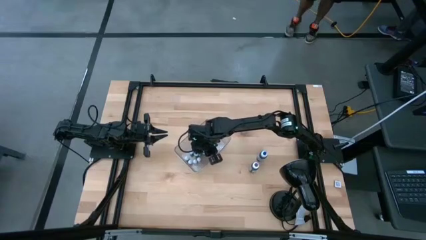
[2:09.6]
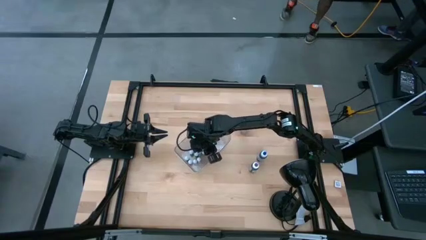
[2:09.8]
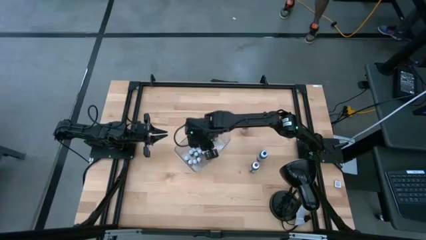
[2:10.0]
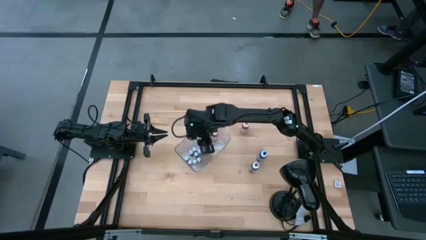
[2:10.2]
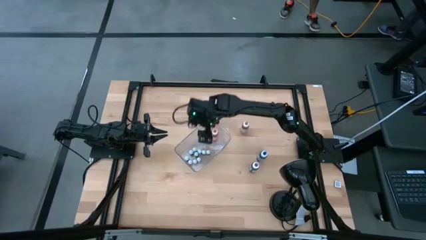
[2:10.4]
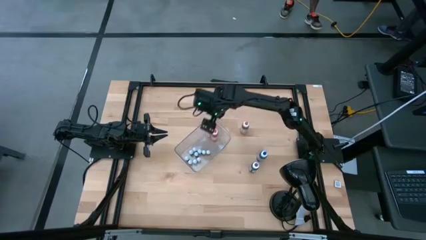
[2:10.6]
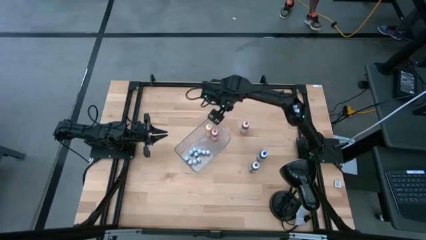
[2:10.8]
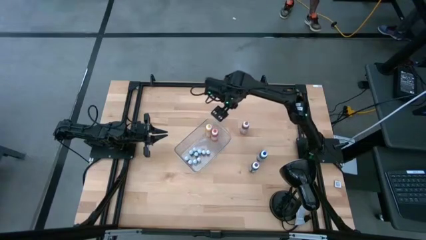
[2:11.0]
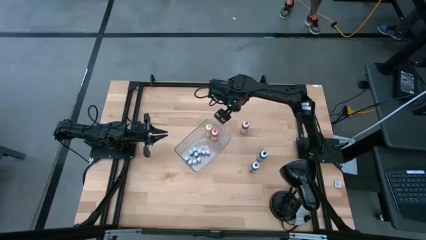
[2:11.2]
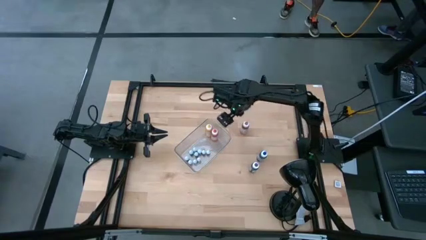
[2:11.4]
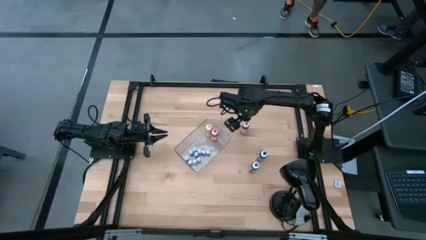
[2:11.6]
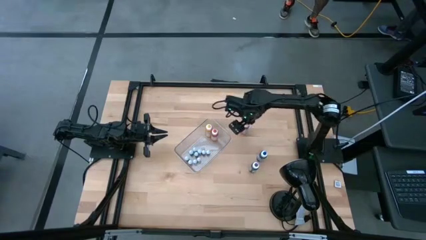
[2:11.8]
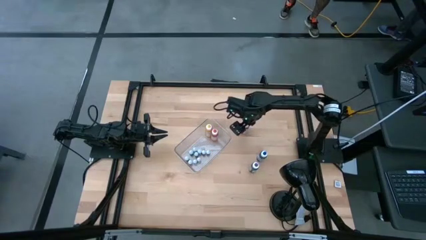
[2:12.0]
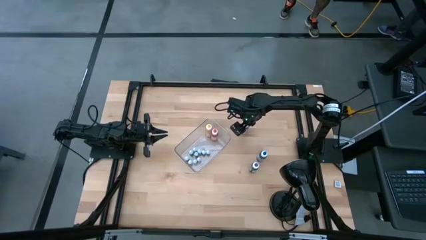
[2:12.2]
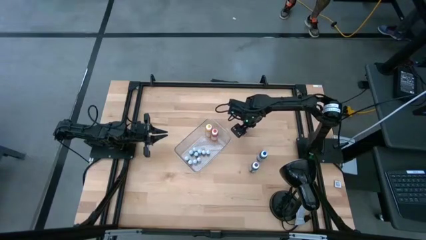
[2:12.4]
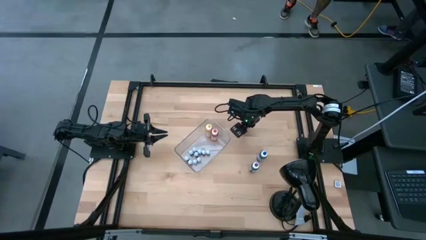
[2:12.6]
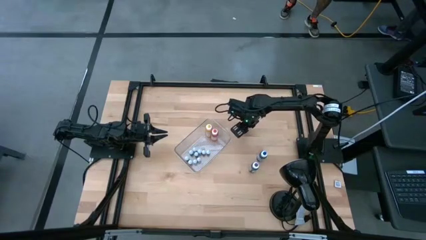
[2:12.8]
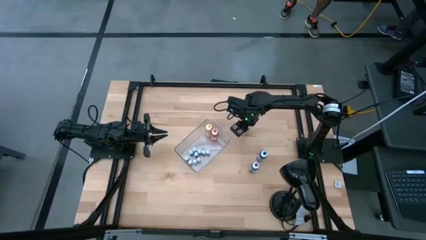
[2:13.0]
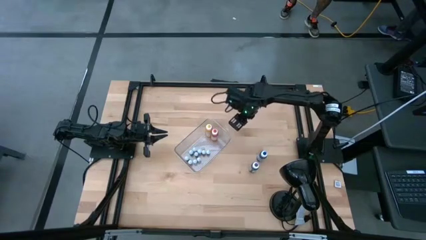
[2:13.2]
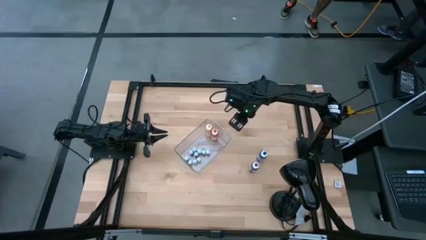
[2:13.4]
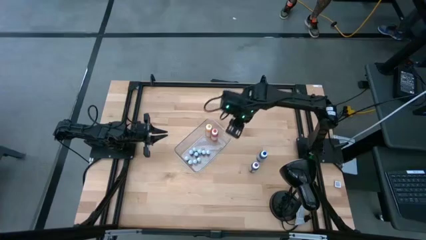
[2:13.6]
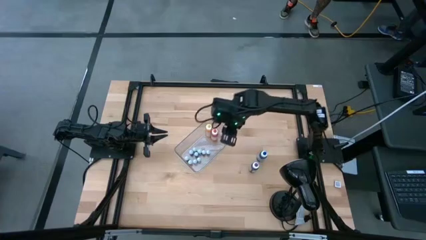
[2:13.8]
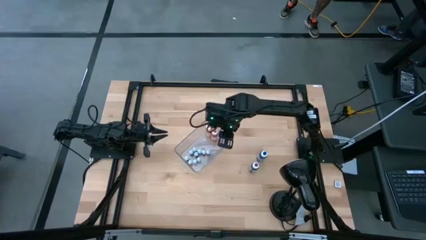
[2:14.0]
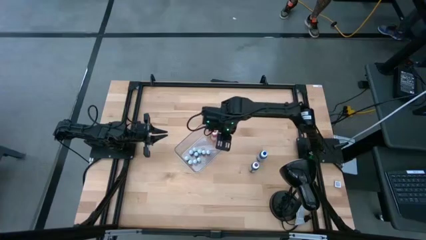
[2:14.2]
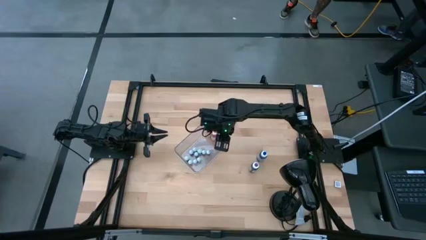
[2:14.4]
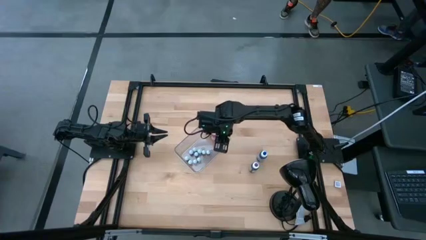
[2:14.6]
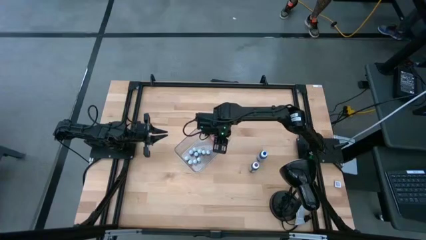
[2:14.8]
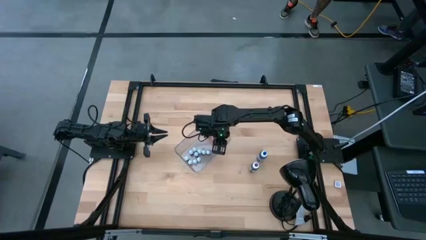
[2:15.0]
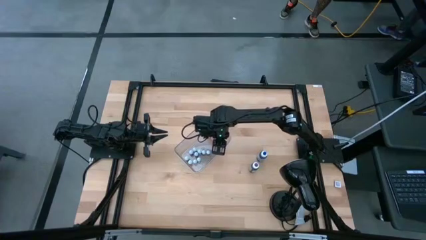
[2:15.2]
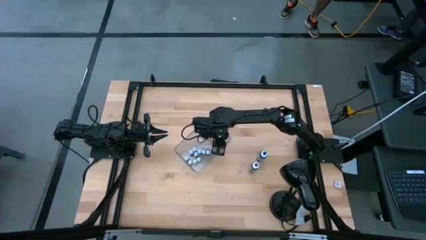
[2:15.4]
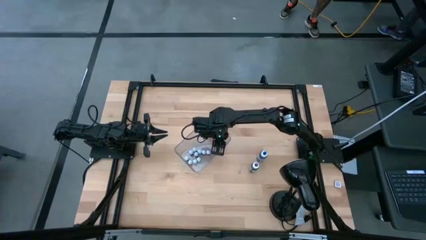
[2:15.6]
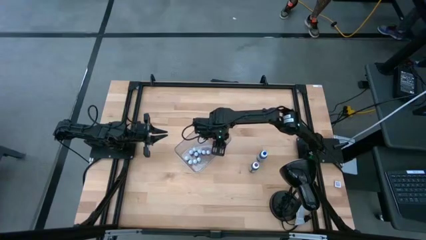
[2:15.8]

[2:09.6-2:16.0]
Task: Pick & Place food coloring
Put the large pink food coloring bottle into the transparent bin

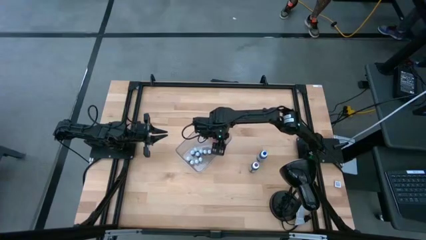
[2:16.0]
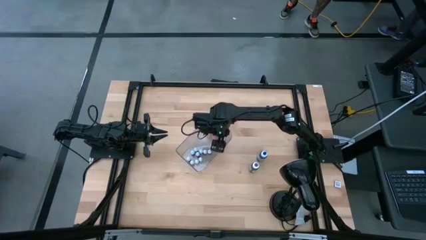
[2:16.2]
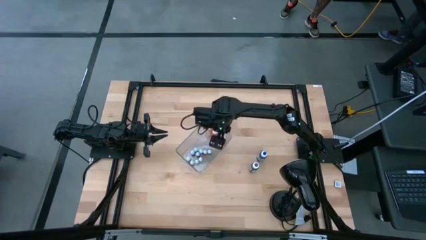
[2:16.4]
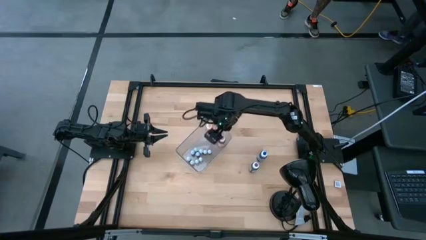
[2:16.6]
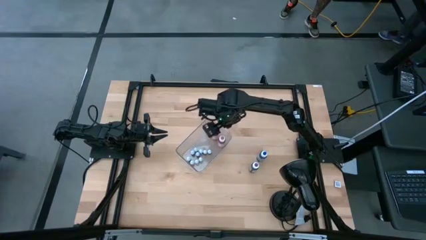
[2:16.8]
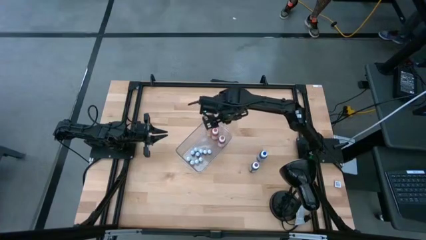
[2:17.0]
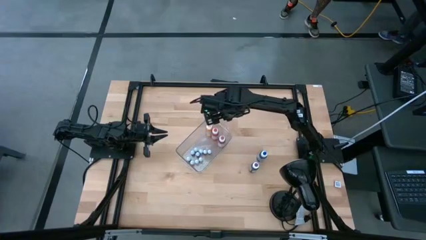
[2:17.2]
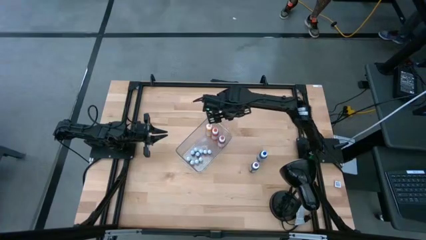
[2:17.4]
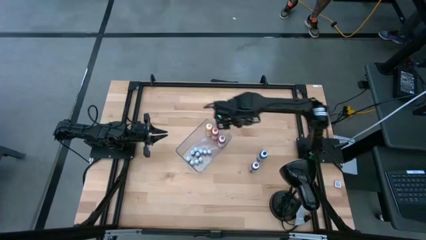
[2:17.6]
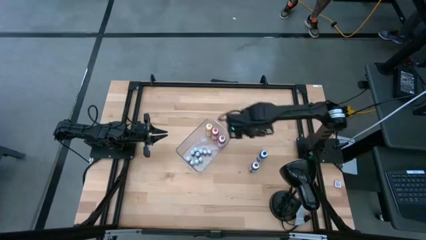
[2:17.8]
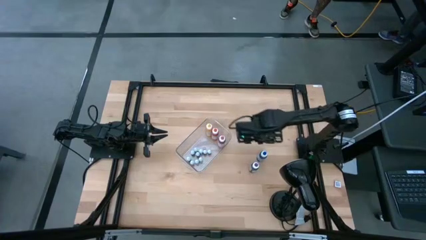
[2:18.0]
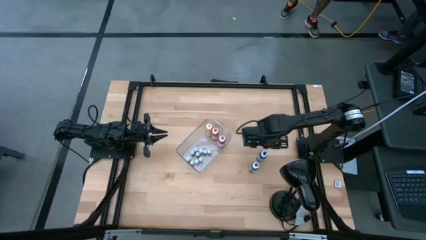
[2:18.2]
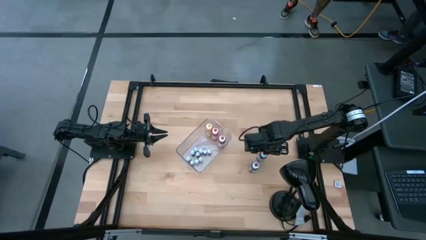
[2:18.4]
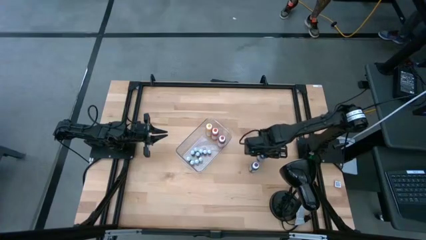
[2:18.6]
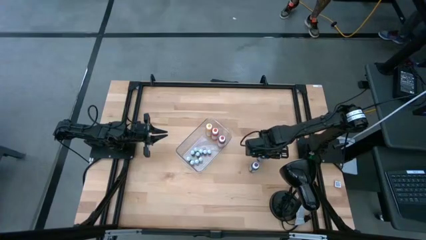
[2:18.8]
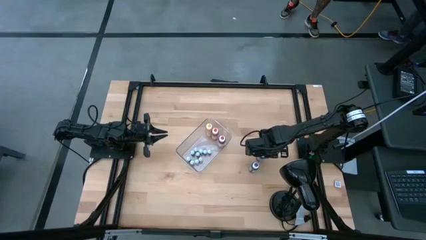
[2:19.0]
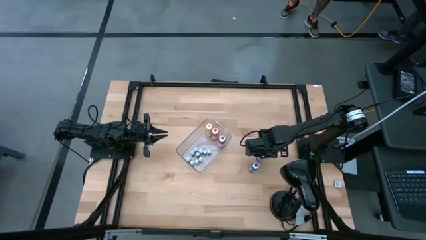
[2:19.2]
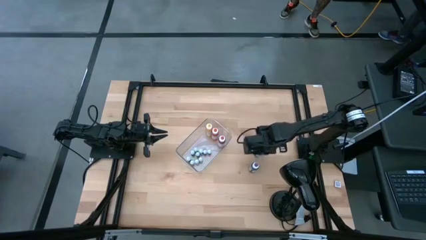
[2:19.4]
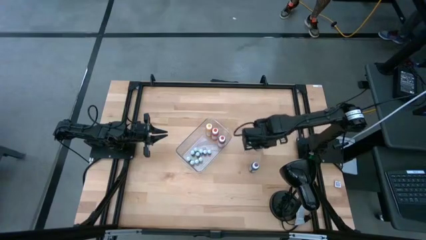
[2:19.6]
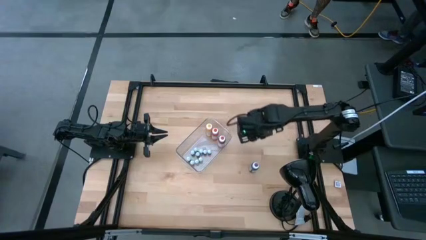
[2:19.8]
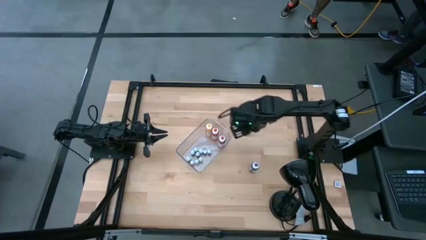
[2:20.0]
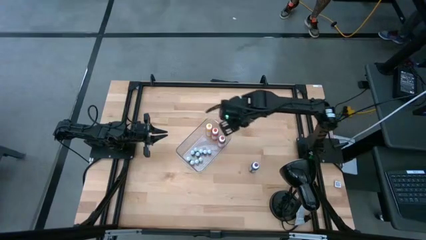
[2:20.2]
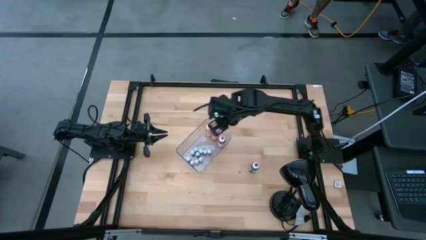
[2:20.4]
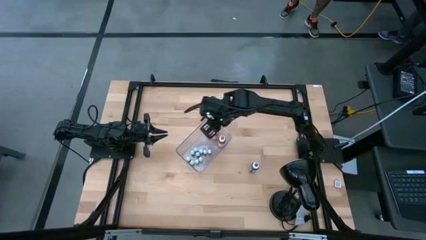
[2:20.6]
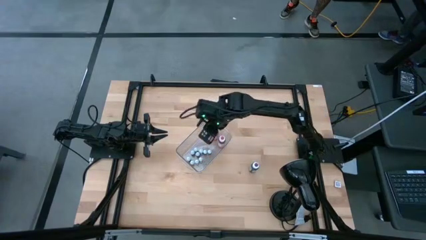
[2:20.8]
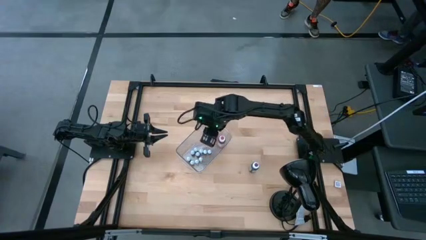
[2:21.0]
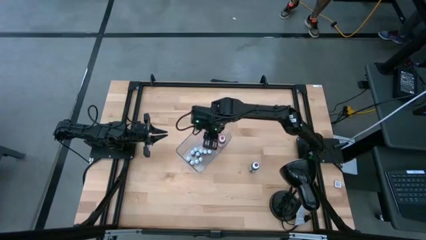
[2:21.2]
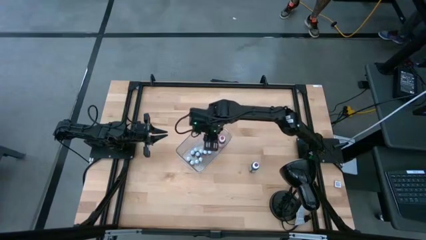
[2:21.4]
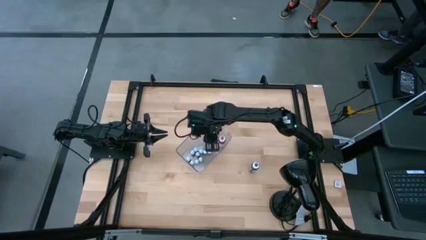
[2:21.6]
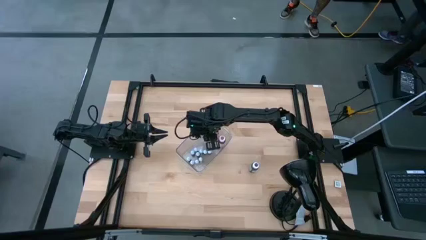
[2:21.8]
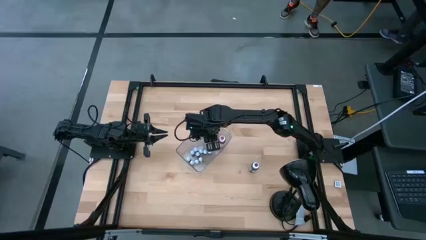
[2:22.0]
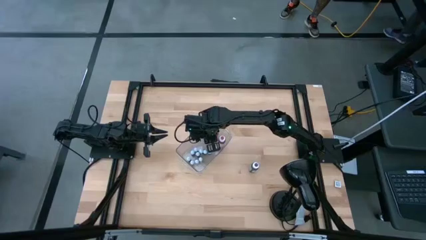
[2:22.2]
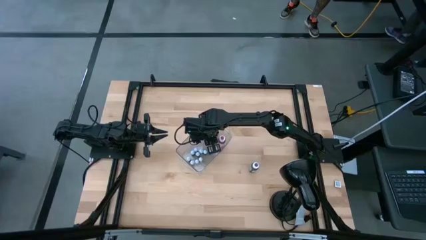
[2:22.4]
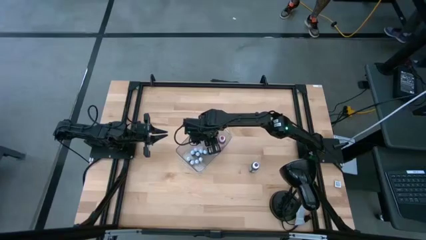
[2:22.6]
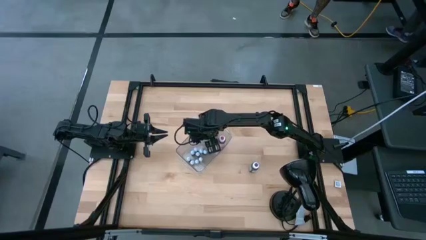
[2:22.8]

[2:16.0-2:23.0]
Put the large blue food coloring bottle into the transparent bin

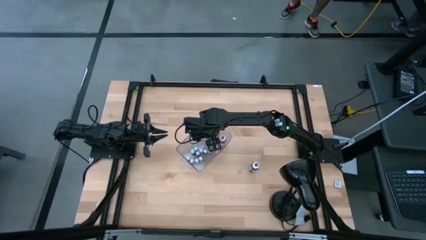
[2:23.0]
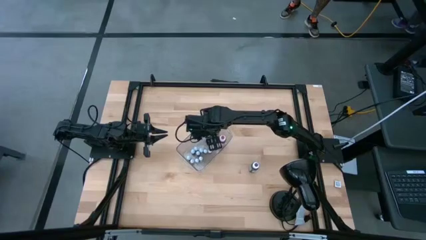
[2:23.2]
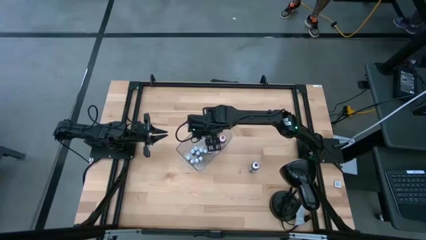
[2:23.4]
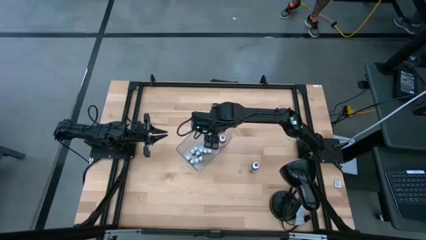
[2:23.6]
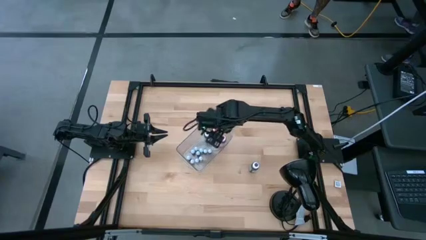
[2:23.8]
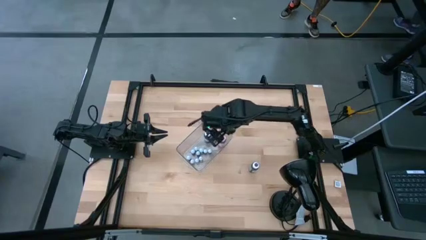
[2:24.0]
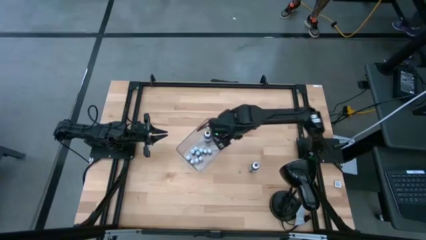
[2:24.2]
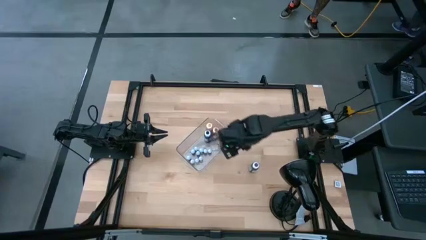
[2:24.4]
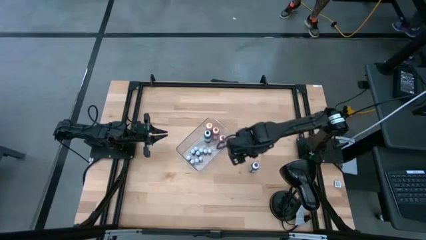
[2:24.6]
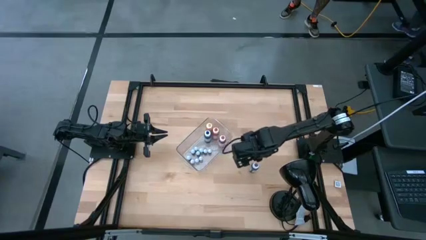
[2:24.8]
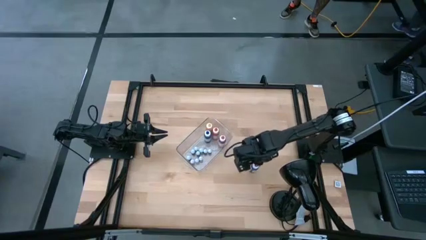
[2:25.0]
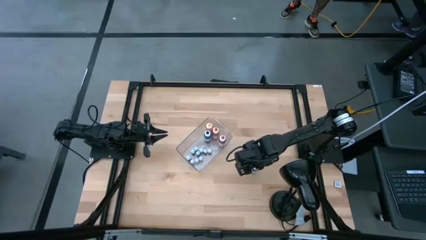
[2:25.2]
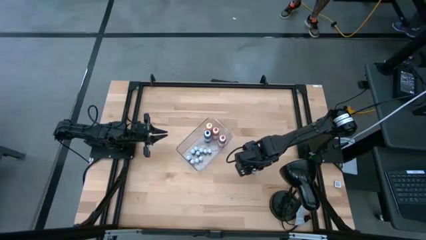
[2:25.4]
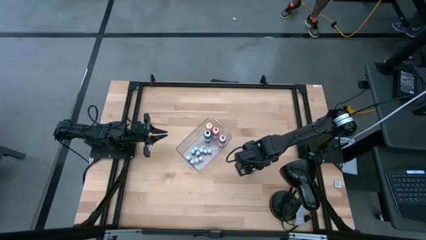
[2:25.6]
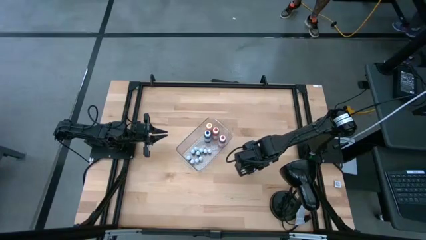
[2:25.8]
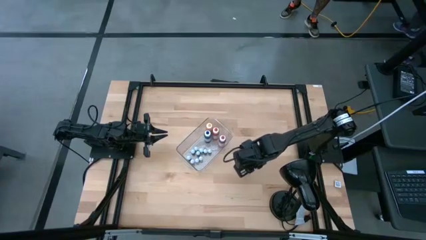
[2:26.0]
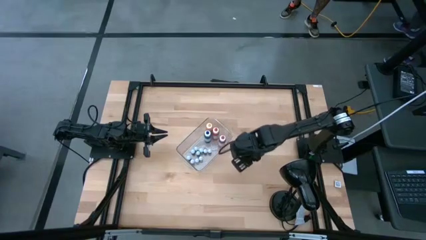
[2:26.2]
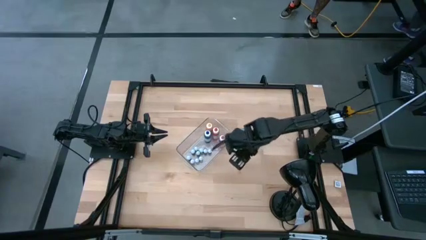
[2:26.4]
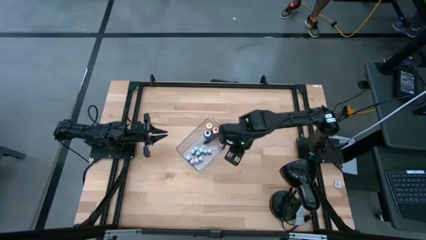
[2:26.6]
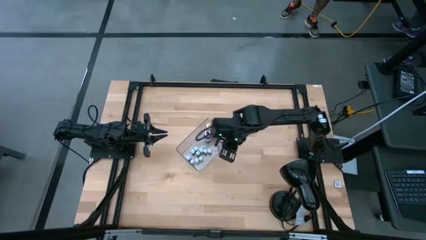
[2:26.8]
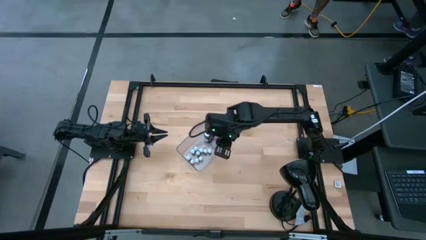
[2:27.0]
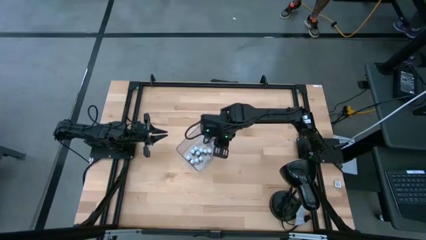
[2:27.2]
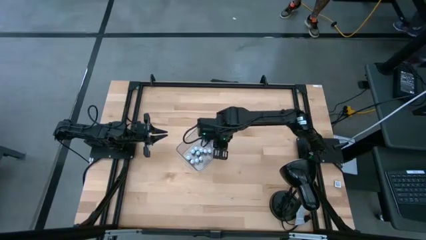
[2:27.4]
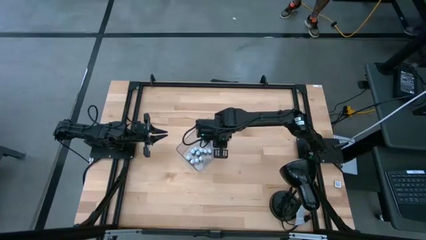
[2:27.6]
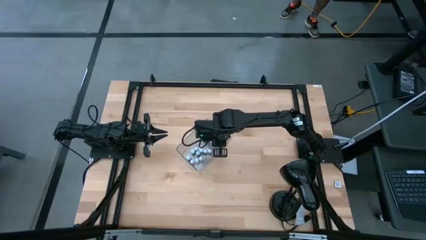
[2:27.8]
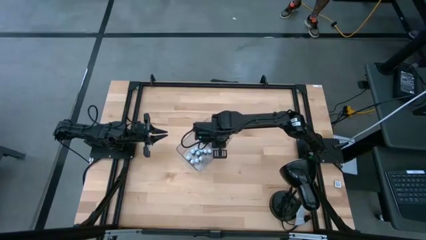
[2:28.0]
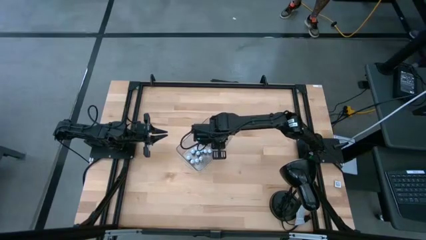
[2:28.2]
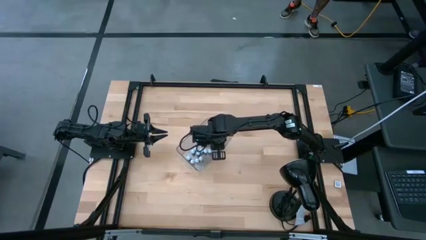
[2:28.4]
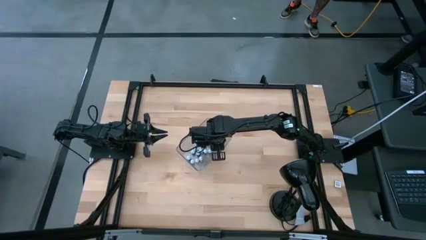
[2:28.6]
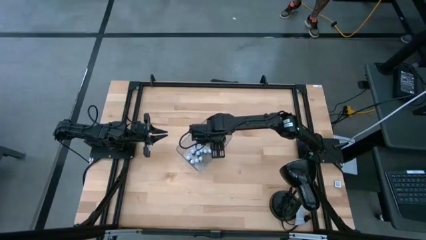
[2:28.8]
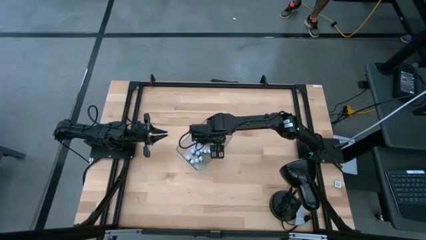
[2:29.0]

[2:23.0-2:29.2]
Put the large violet food coloring bottle into the transparent bin
